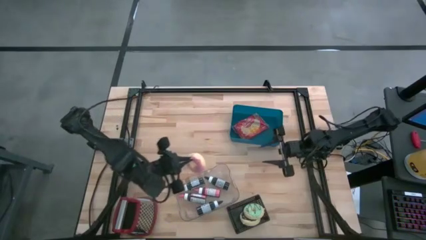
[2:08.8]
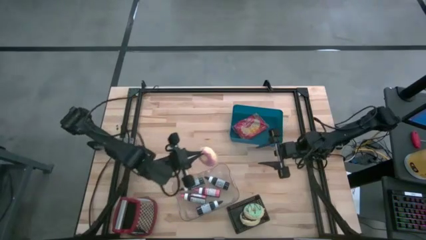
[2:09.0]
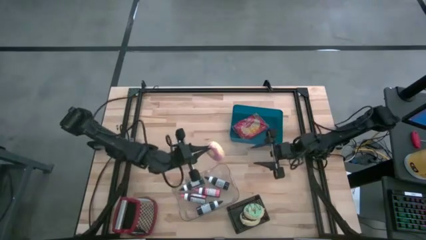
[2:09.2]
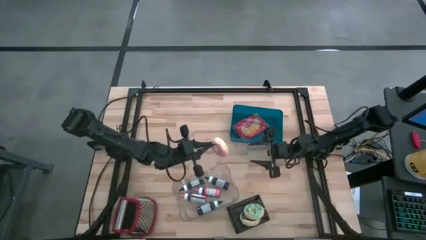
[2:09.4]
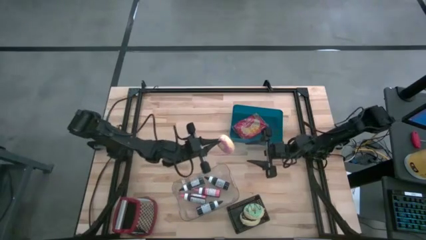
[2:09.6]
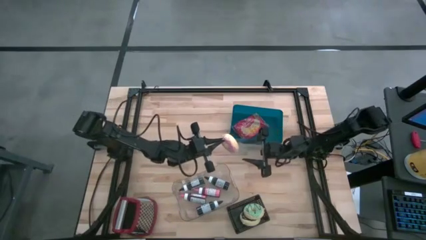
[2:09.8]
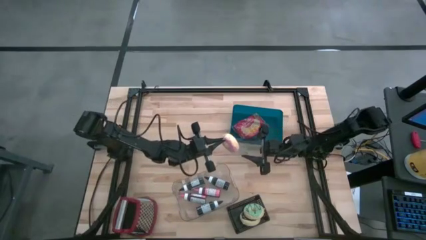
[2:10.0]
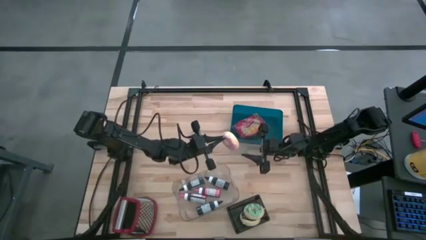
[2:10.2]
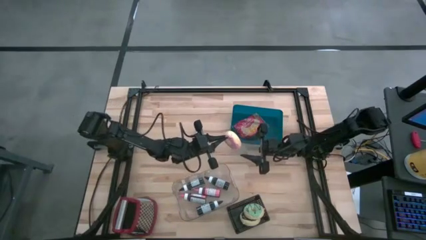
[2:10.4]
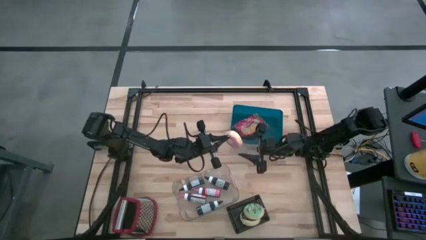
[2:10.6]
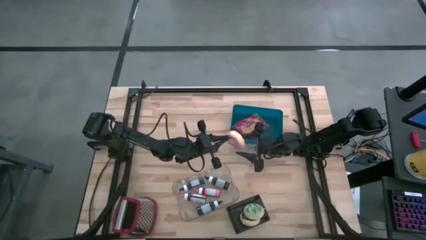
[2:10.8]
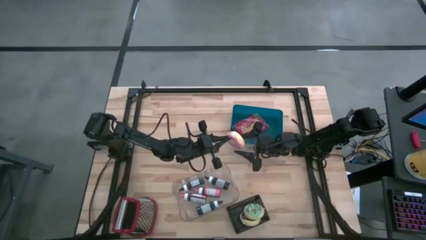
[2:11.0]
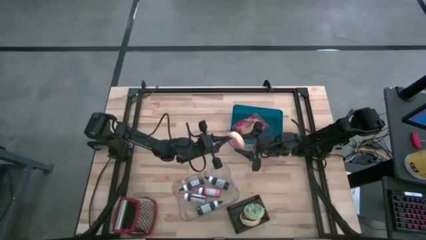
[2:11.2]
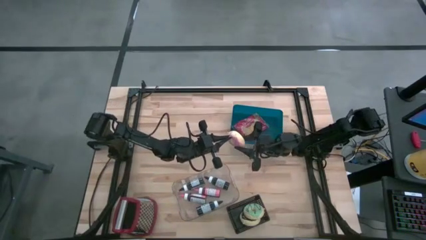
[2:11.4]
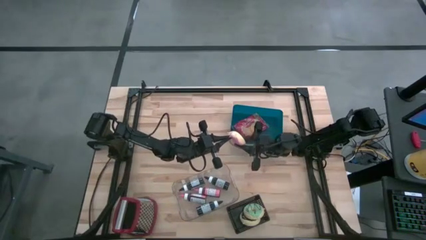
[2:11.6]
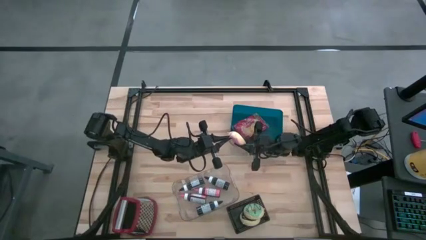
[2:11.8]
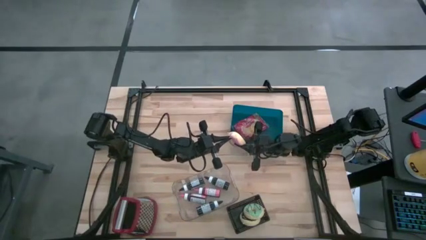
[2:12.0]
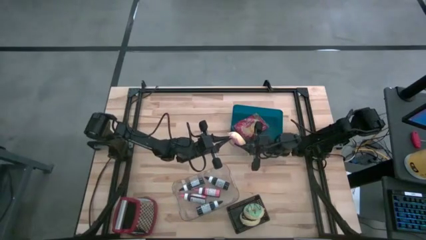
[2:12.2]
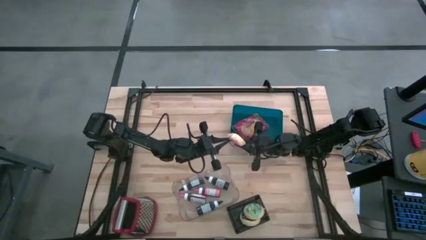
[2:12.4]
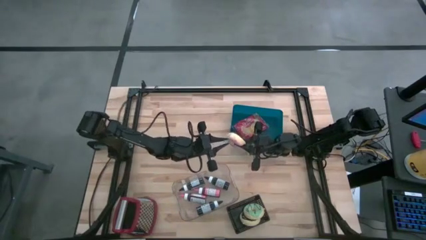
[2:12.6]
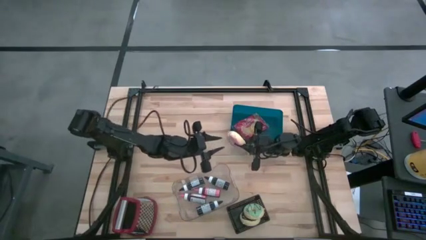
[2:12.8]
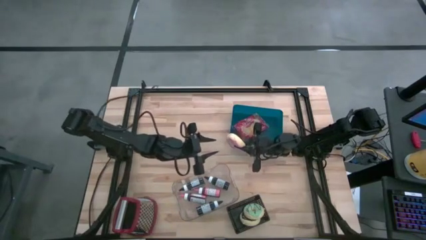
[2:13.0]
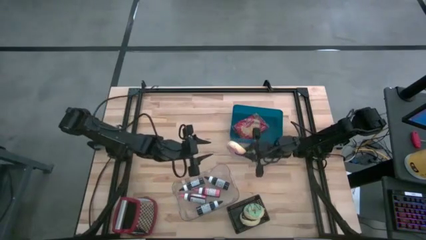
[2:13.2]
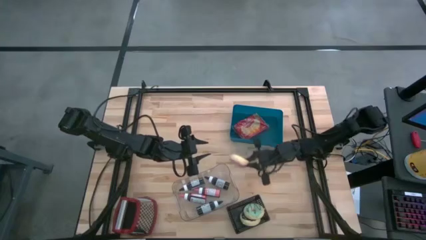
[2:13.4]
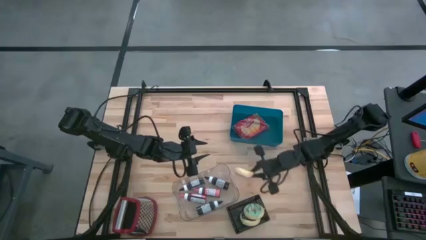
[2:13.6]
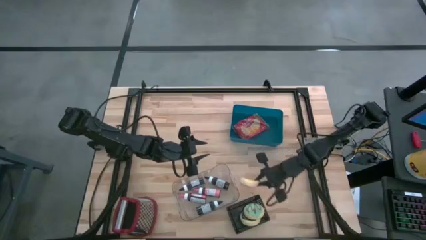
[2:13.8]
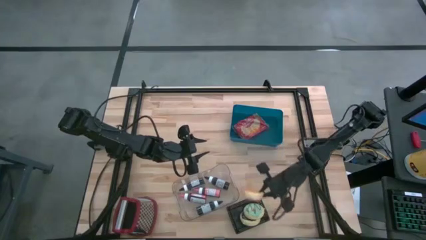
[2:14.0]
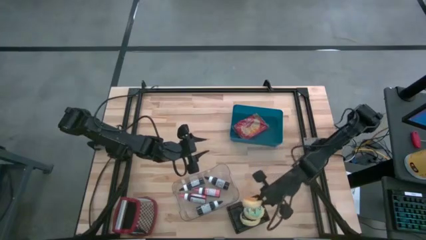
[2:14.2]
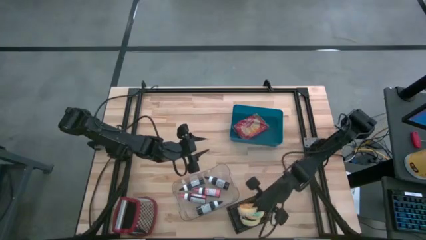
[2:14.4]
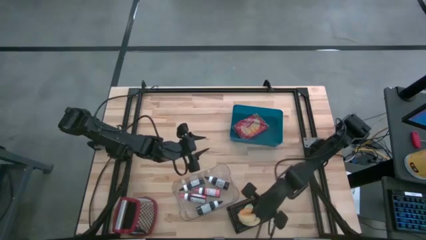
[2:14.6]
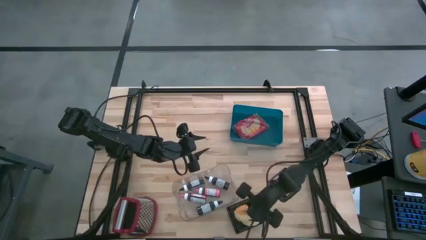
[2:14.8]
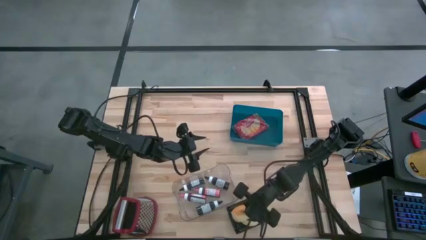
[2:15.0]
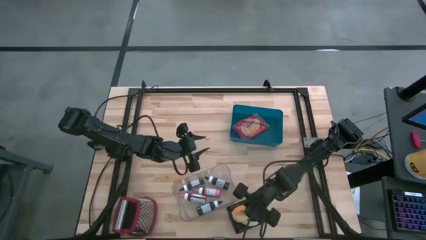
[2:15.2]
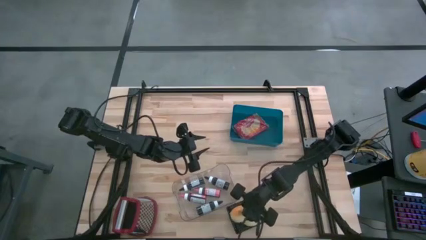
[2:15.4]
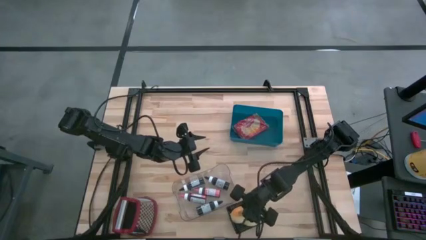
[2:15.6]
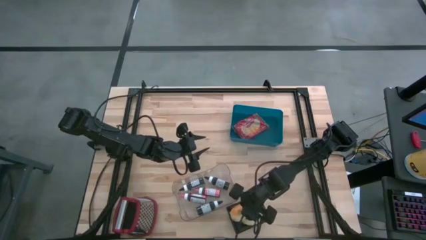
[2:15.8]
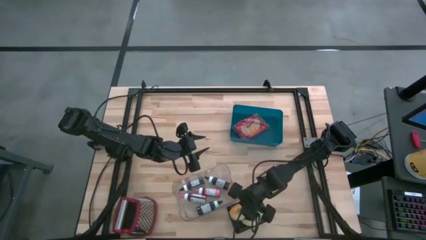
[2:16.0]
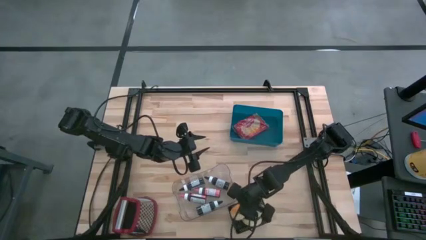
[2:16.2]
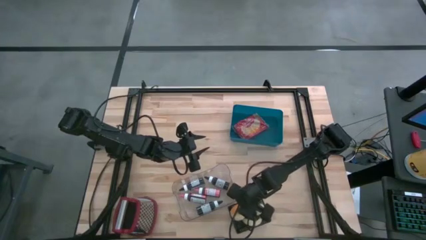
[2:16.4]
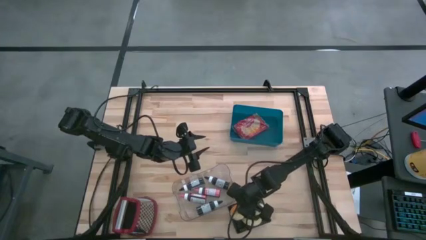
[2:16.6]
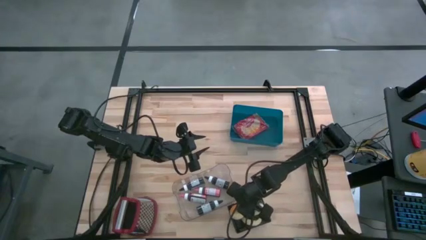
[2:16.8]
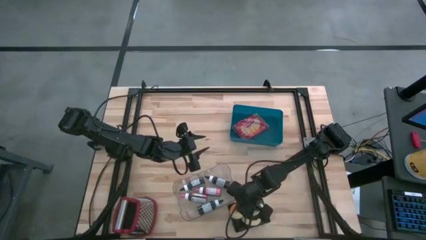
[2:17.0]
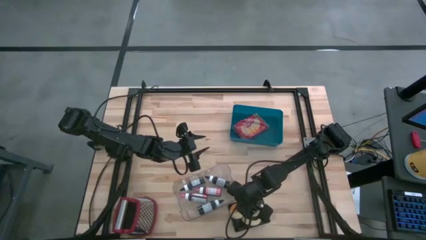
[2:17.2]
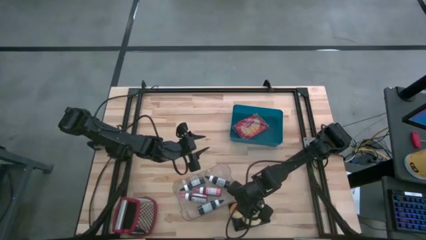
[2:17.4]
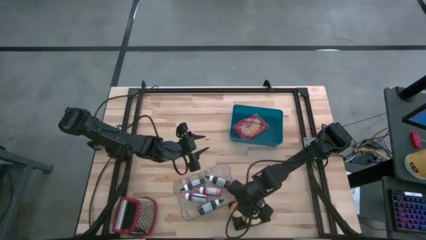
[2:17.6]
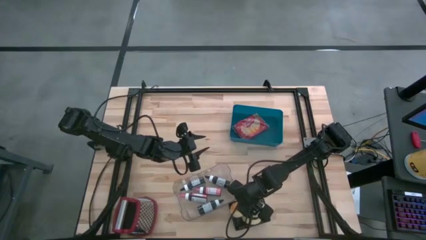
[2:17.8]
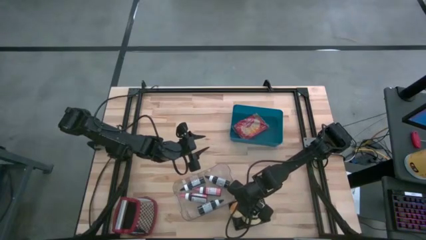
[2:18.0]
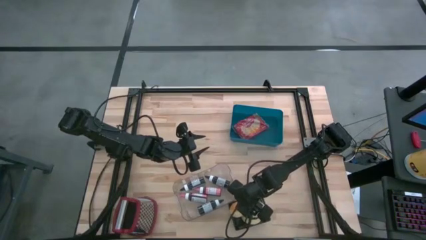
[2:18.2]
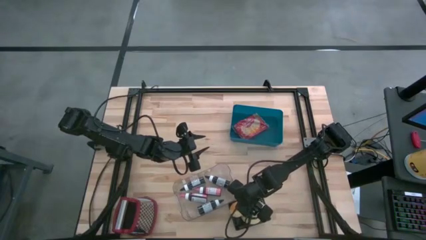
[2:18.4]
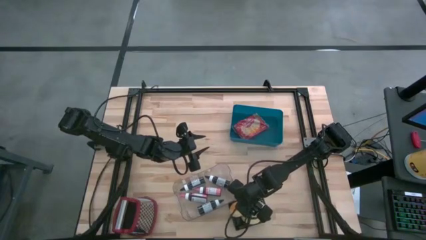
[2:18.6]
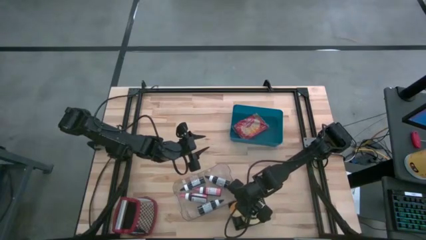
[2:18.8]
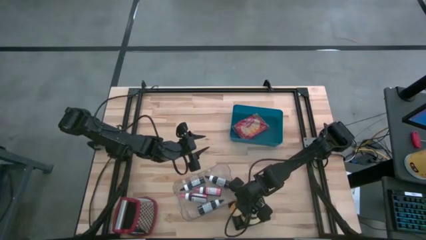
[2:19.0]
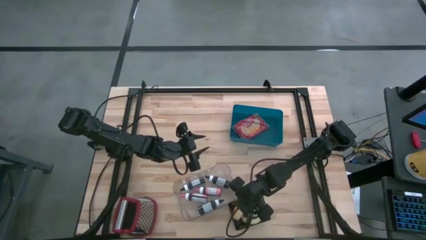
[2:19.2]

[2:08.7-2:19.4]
Put the pink donut into the black basket

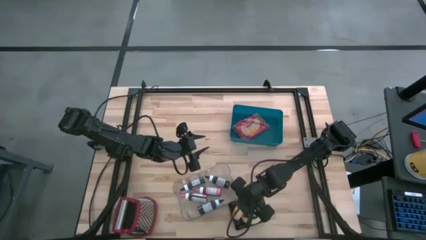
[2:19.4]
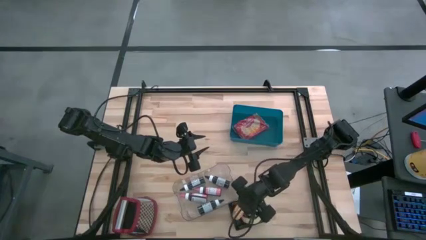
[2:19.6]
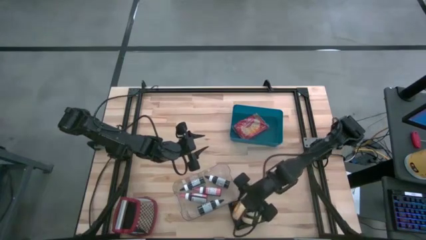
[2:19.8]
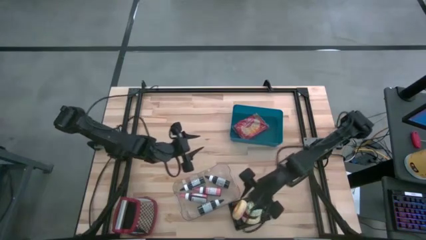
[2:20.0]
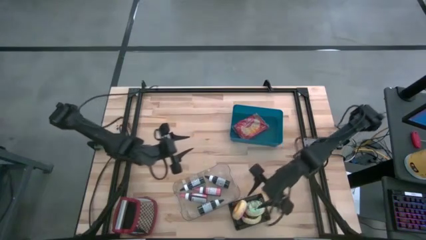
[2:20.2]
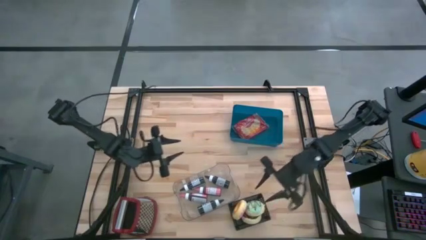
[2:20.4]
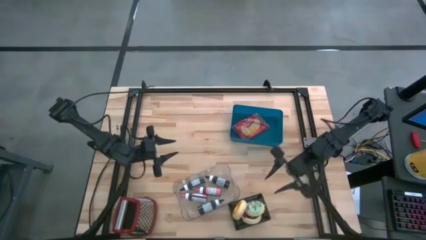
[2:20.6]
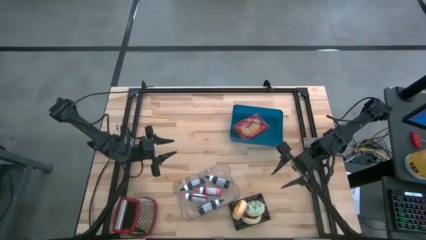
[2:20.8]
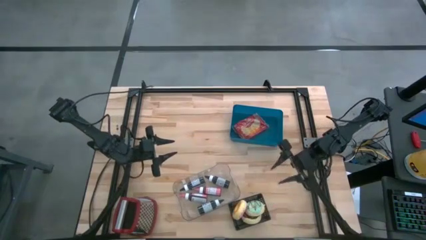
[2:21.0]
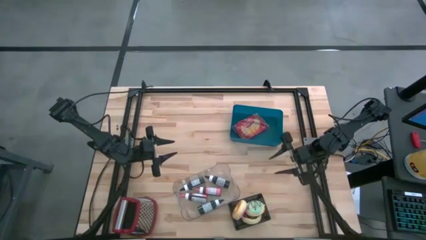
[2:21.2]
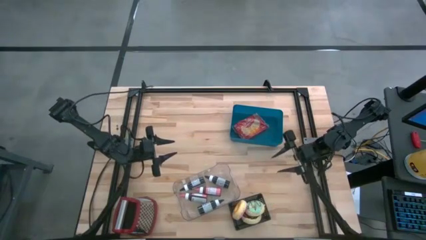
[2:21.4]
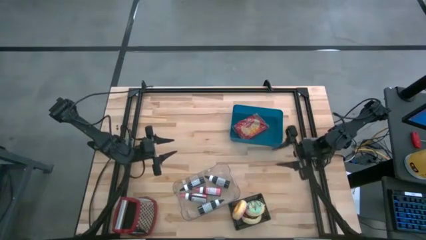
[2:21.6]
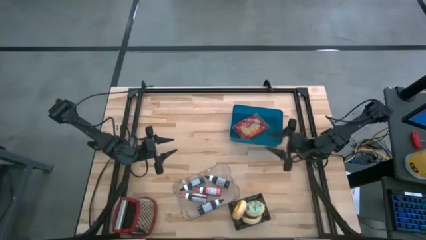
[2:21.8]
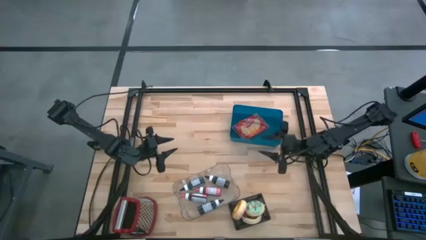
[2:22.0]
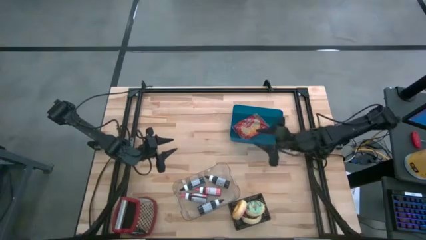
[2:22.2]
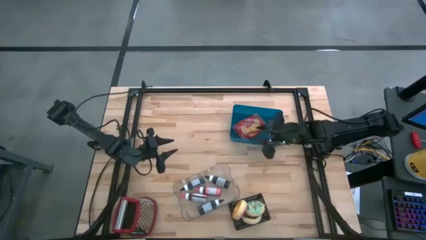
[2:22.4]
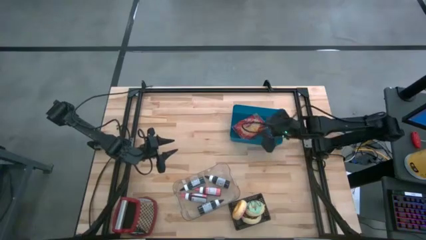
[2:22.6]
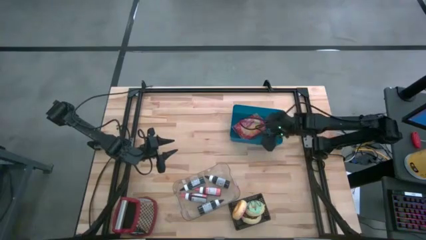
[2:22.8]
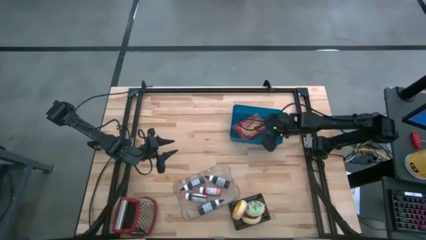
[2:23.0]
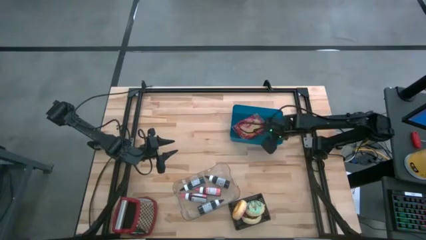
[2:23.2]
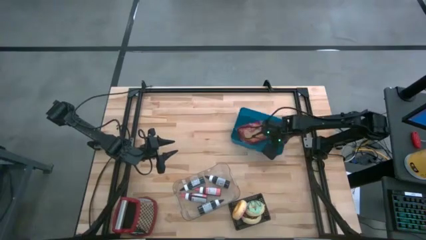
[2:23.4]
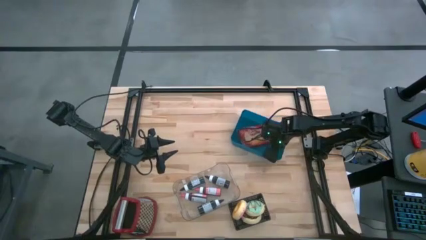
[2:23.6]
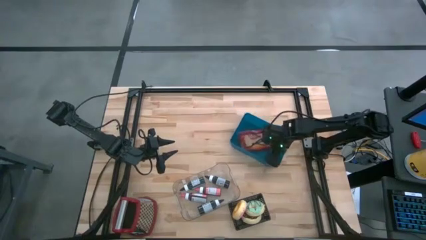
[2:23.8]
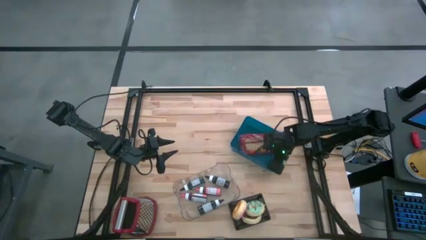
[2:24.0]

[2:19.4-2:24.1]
Adjust the blue bin
